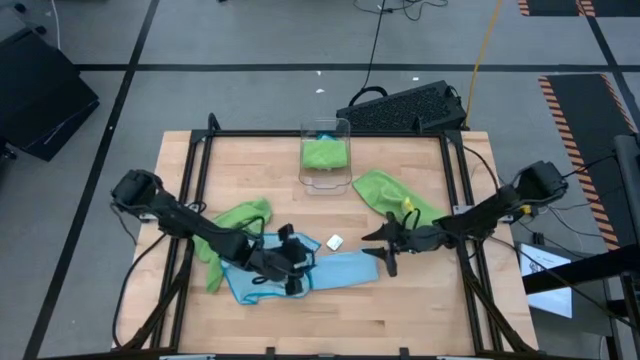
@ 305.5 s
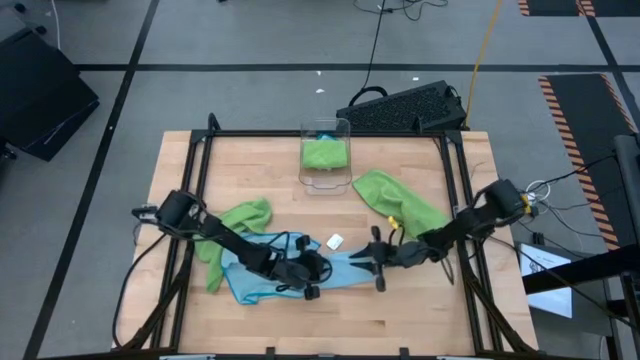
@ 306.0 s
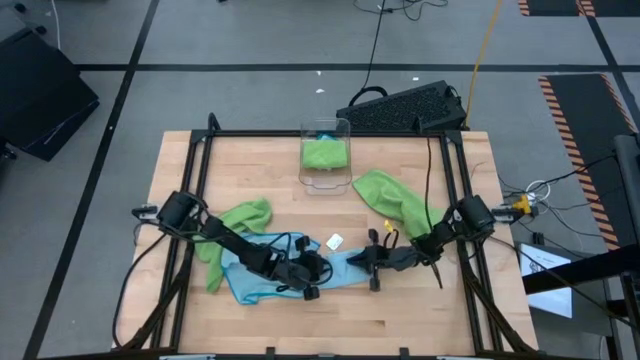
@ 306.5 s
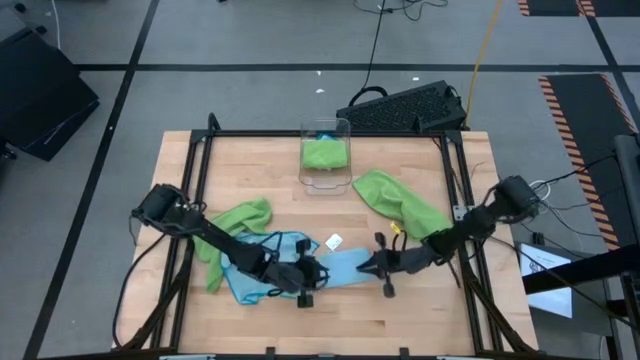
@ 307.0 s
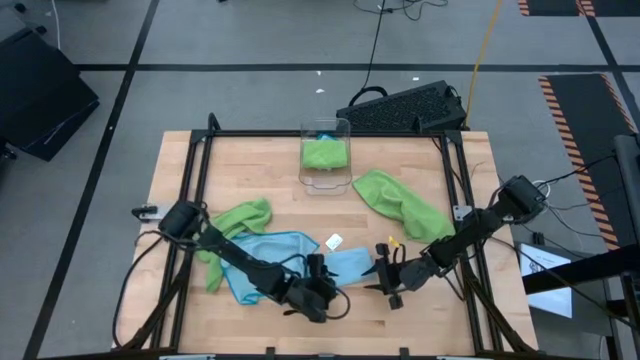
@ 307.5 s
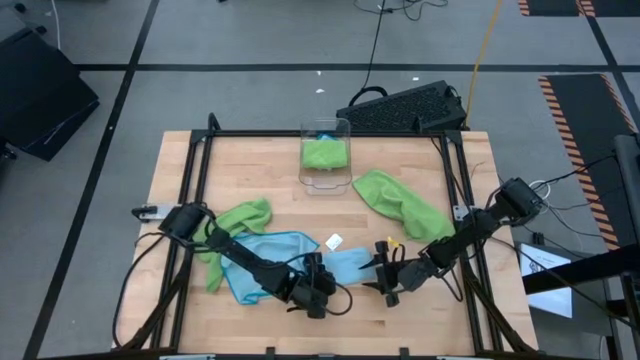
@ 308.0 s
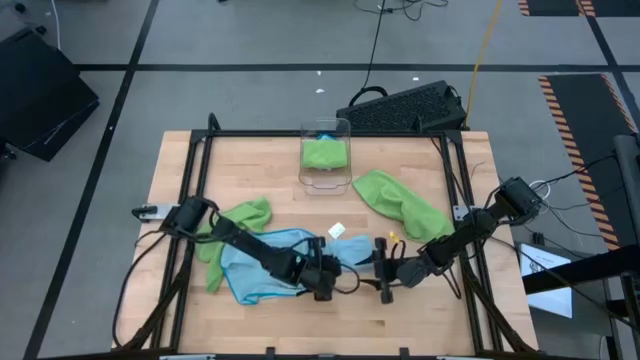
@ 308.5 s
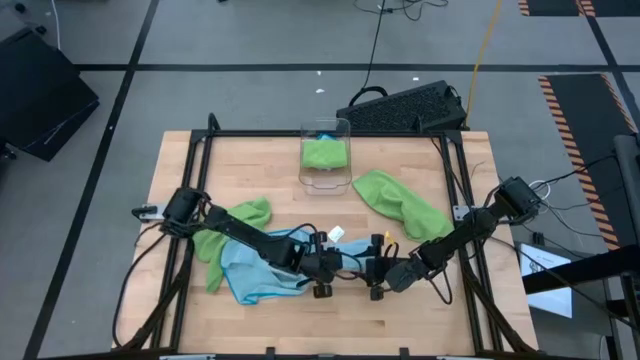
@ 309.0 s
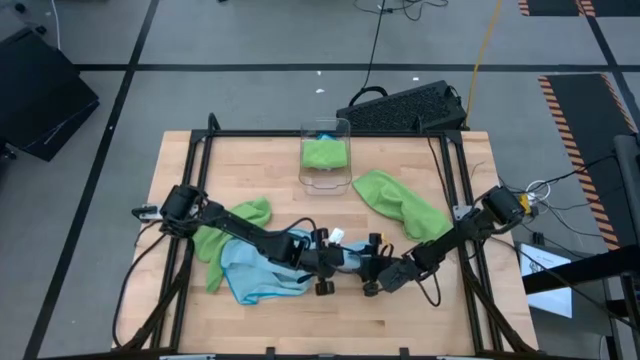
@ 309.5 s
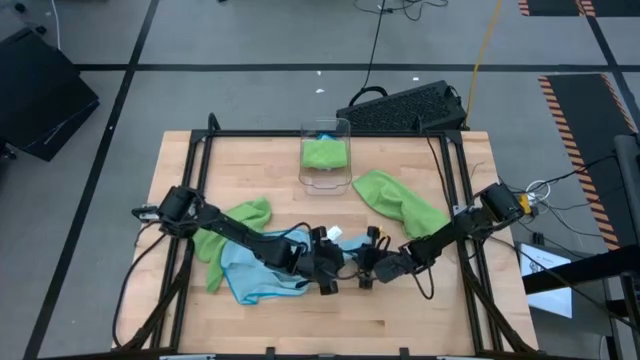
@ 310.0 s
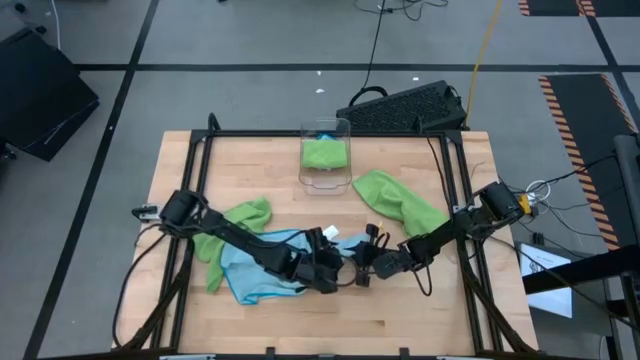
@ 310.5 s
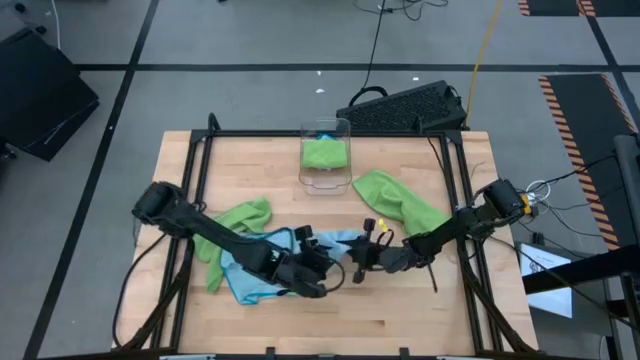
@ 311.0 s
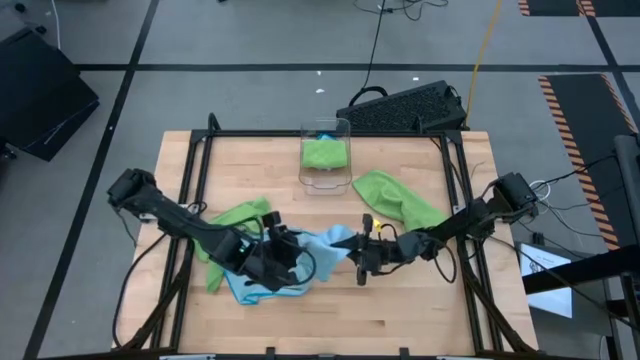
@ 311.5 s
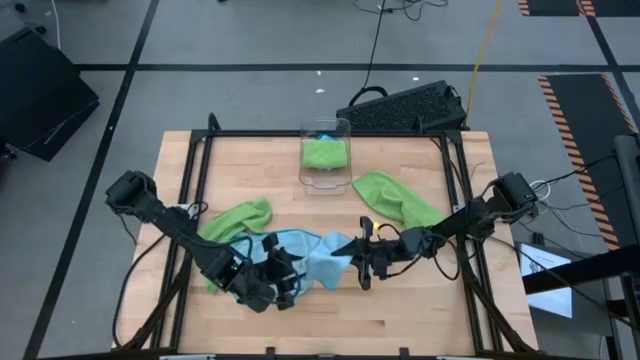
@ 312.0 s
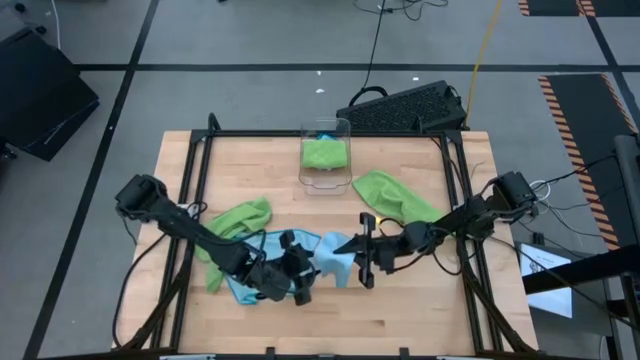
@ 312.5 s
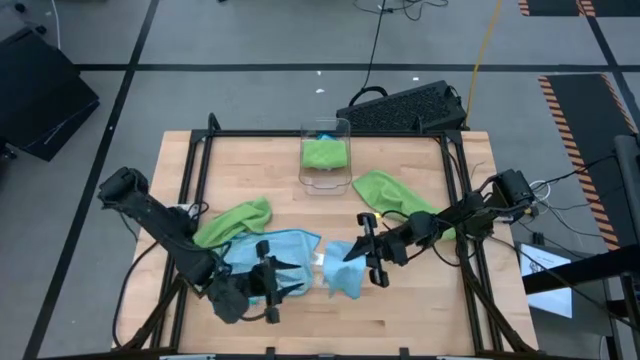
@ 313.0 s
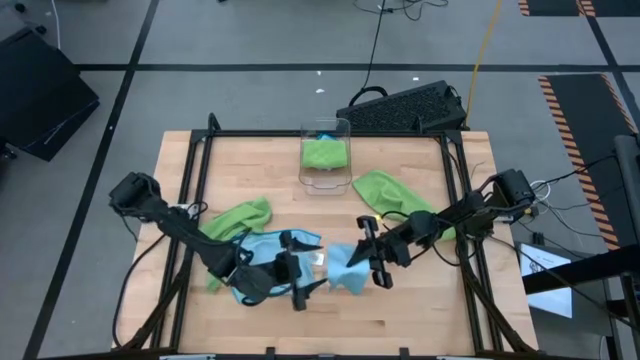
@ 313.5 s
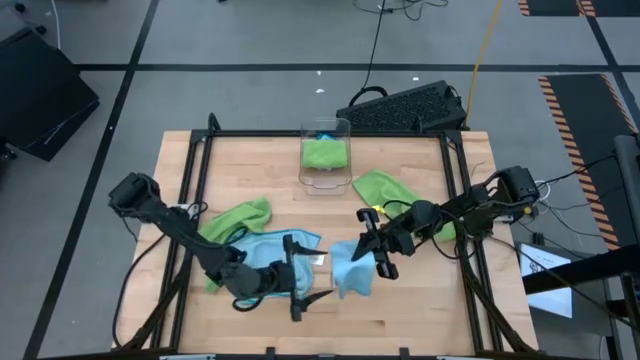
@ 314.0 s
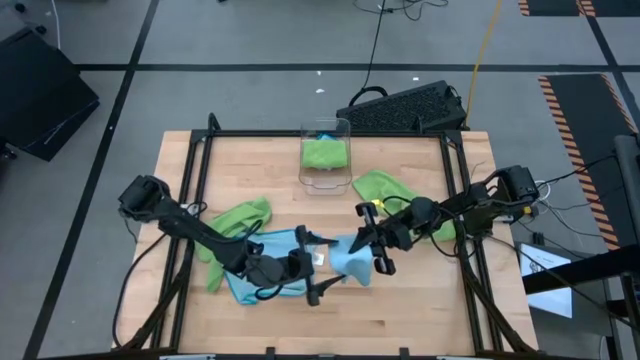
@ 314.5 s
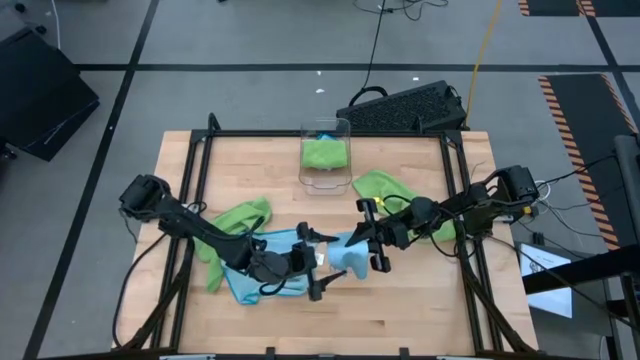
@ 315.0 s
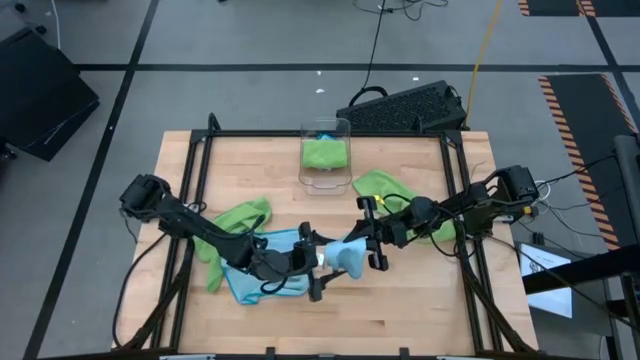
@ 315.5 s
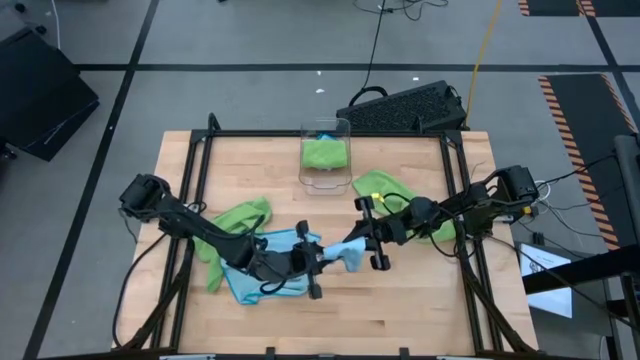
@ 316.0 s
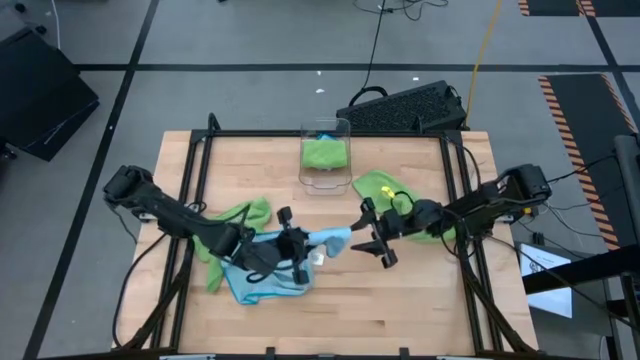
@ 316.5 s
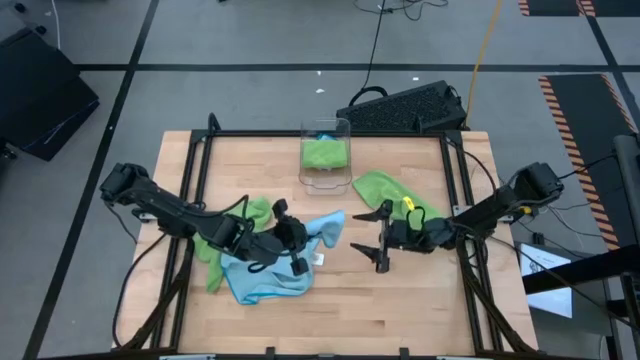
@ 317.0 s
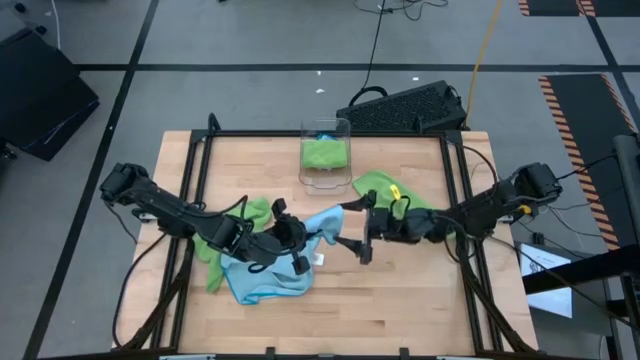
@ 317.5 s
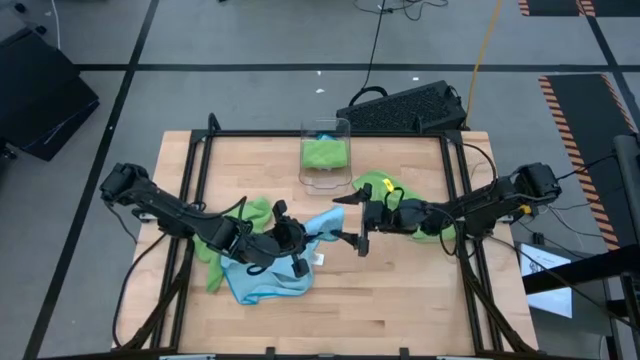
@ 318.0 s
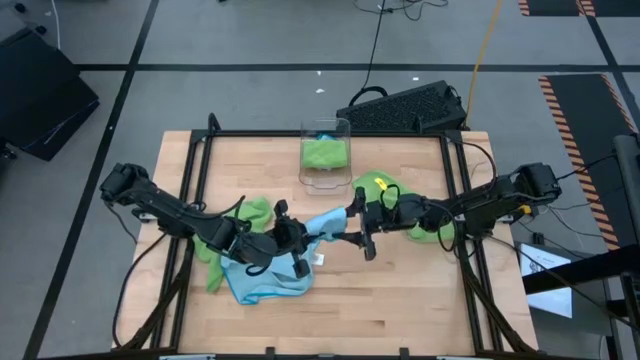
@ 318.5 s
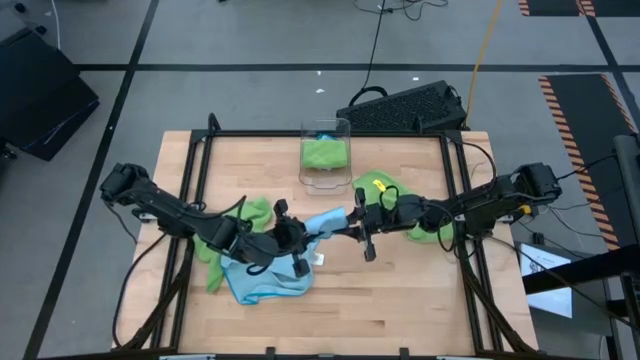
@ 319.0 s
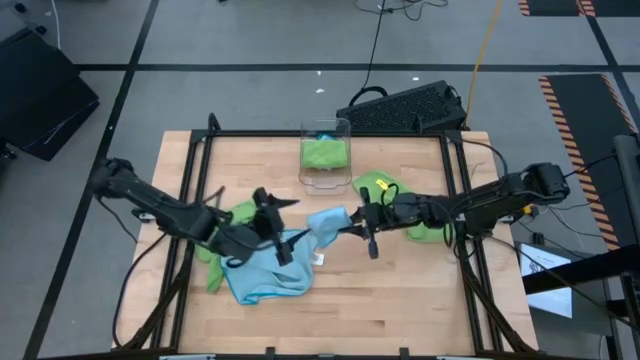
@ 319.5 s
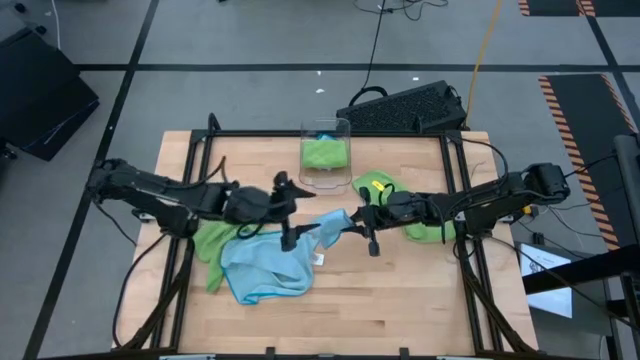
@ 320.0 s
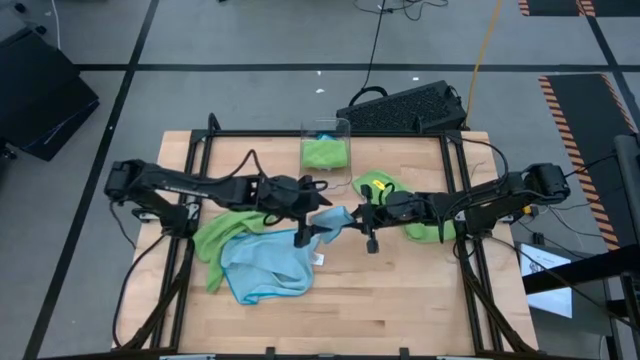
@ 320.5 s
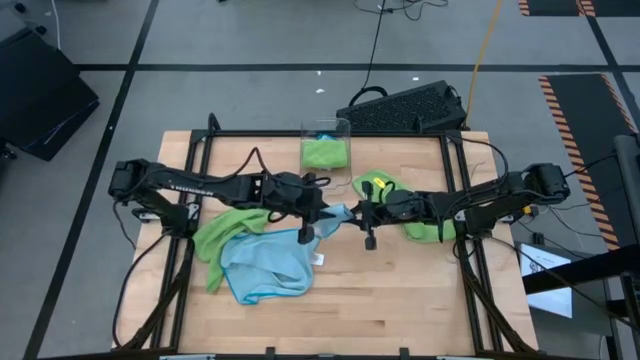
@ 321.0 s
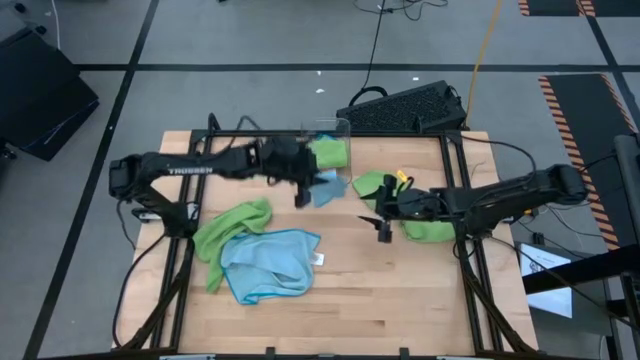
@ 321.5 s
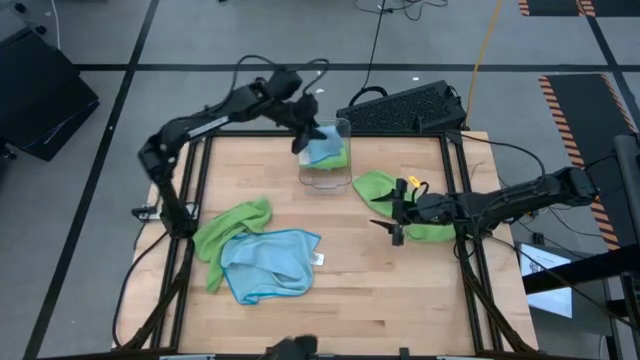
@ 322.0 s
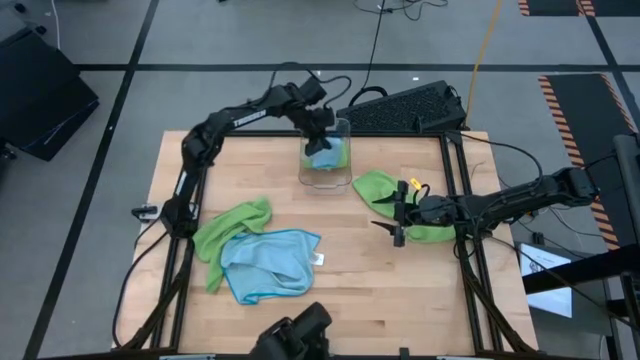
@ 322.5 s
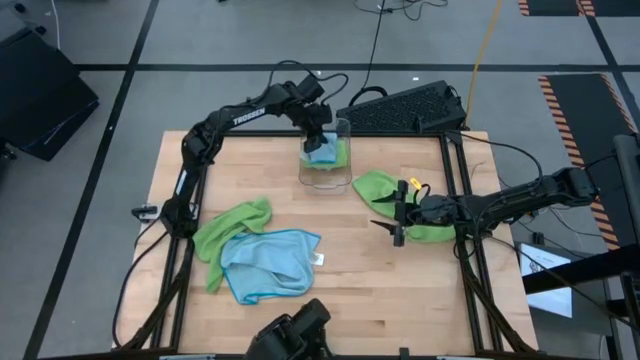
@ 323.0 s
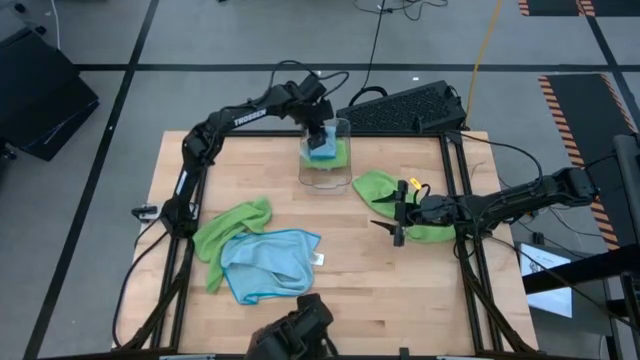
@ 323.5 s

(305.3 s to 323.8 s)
Task: Fold microfiber towels
Put the right blue towel into the transparent bin
